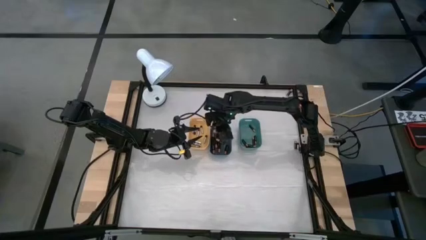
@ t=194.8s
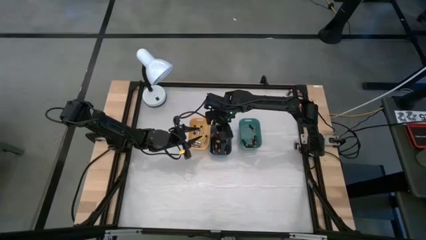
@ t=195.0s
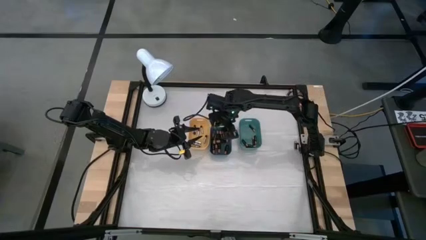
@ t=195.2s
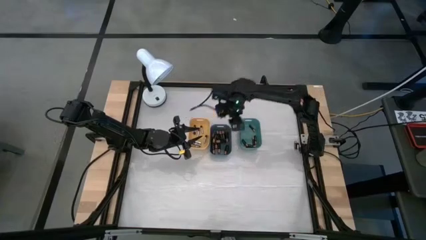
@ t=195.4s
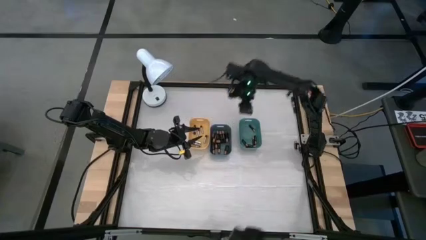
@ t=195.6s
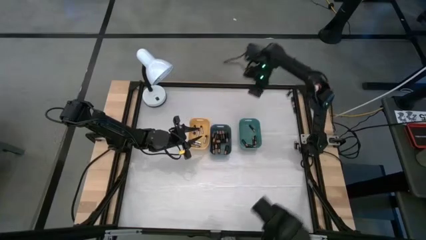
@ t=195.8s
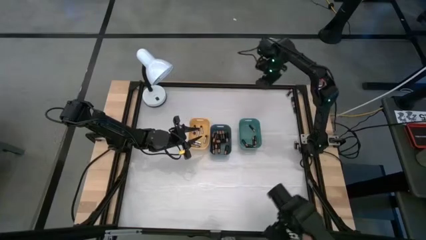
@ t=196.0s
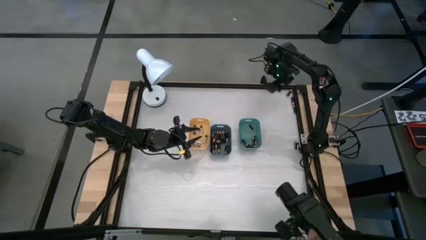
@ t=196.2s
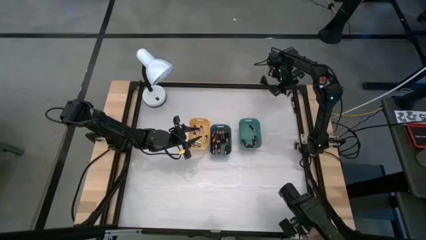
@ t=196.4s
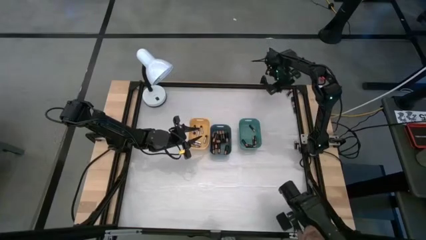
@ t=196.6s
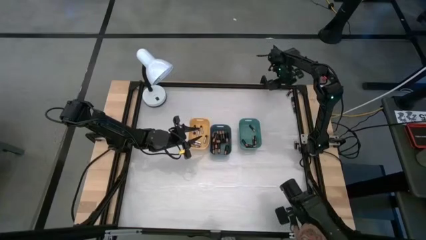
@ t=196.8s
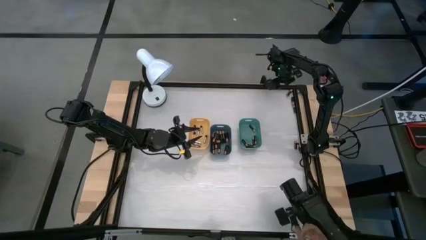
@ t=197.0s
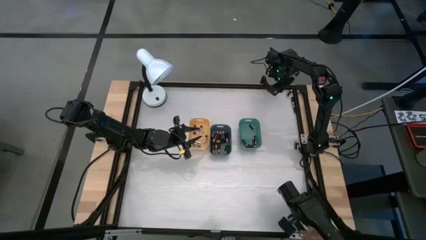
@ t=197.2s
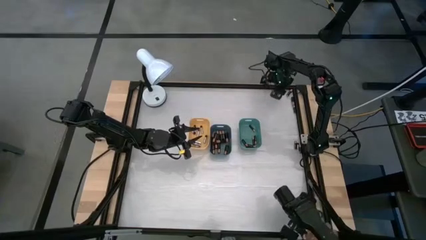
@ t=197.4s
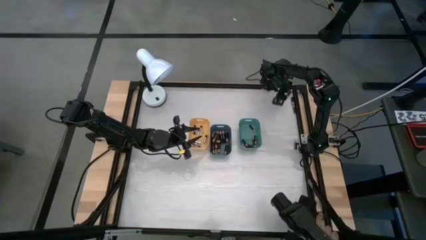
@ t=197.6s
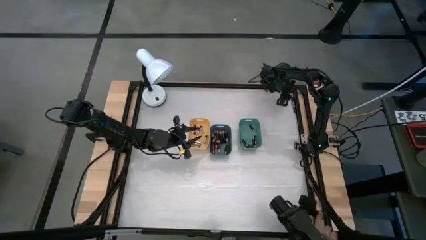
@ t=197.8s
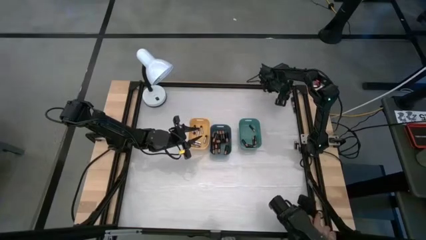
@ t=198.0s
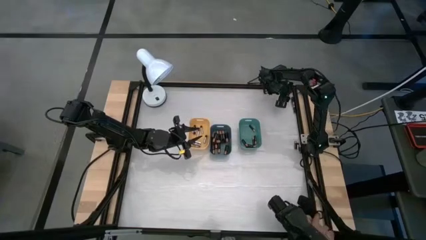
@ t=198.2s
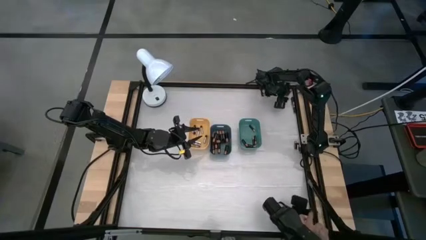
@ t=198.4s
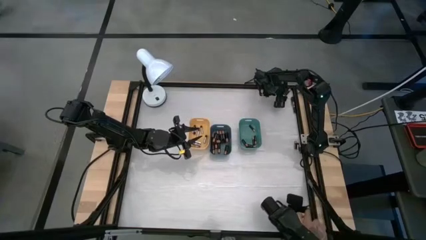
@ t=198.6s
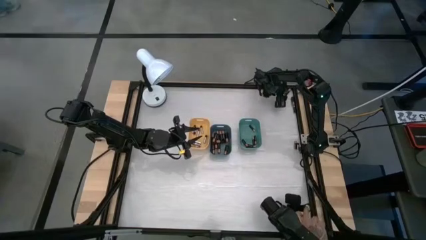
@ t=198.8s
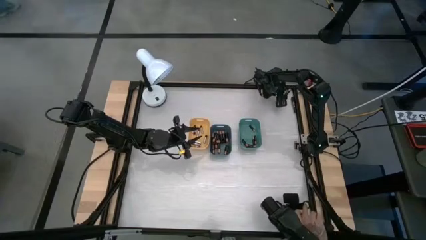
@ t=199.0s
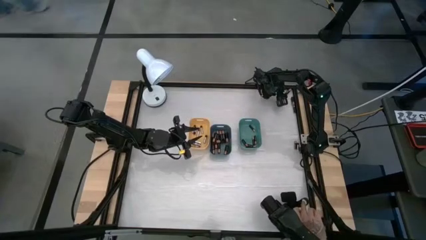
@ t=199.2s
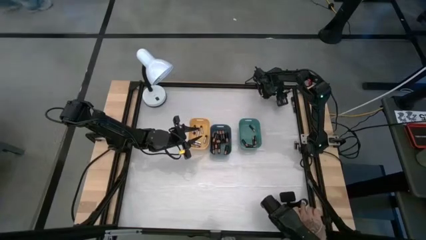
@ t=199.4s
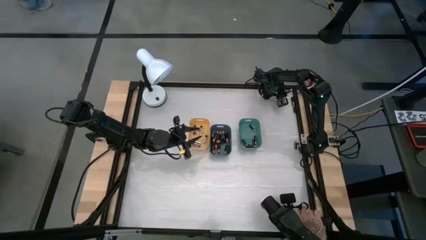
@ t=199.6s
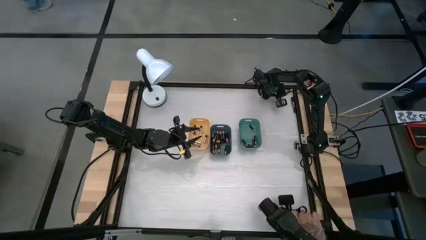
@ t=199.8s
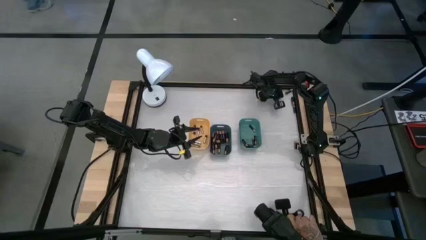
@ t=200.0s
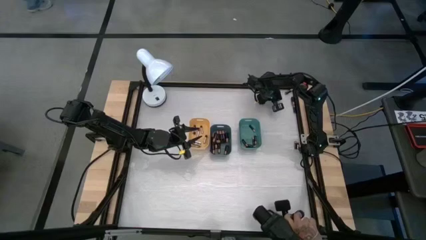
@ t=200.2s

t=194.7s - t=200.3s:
Task: Sort batteries
Put the black battery into the blue bin

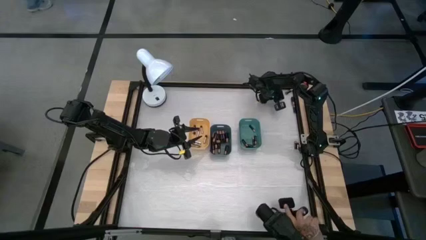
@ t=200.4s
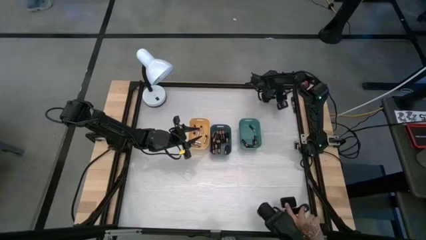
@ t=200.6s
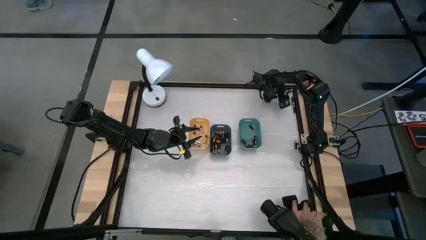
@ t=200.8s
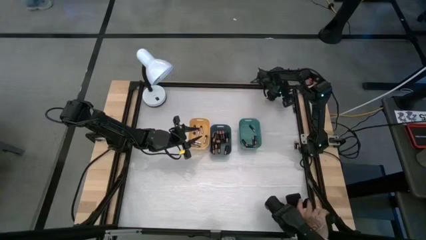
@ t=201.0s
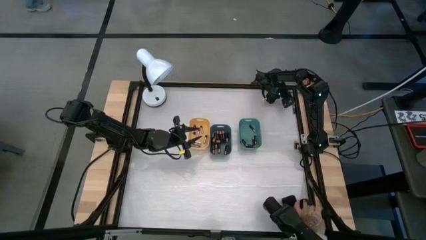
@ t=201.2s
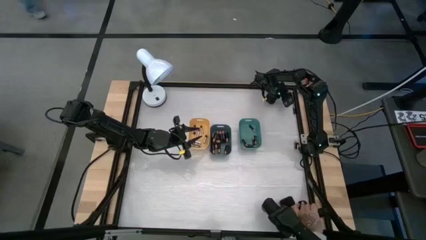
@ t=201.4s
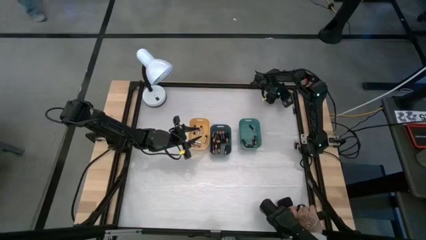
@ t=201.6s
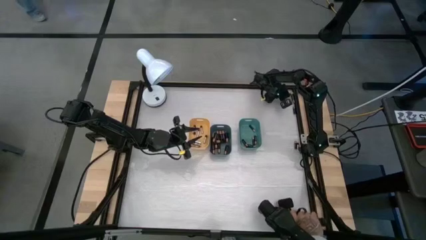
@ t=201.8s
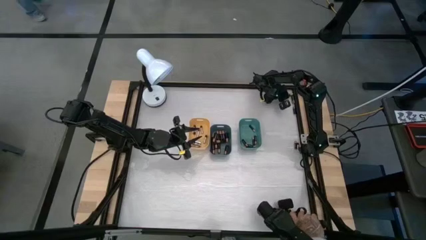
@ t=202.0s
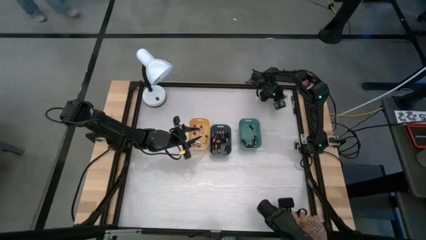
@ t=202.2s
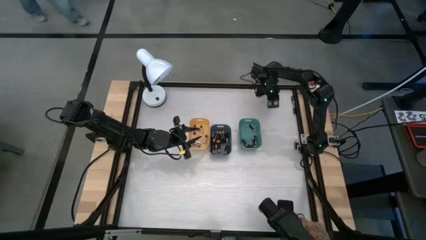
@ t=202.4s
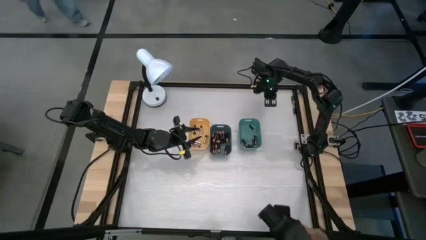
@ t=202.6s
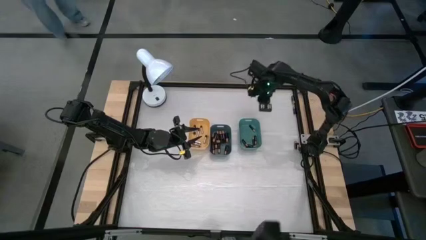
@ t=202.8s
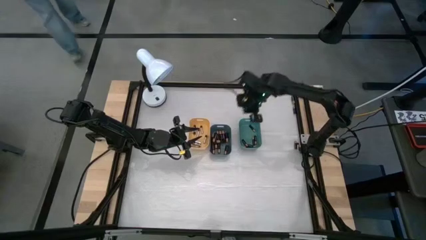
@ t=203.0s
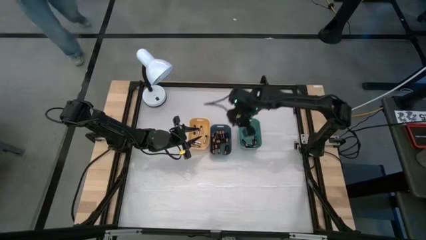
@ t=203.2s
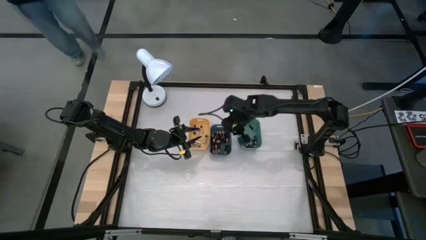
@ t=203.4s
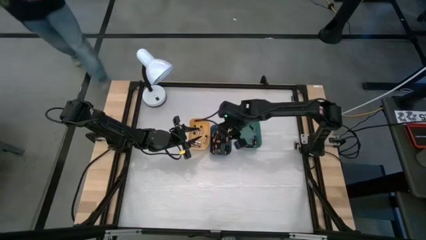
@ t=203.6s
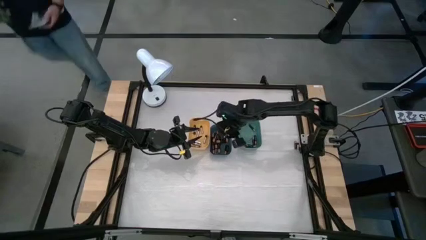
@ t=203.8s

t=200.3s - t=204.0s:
Put the black battery into the blue bin

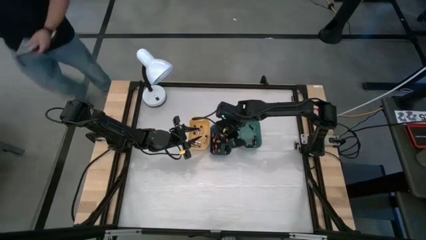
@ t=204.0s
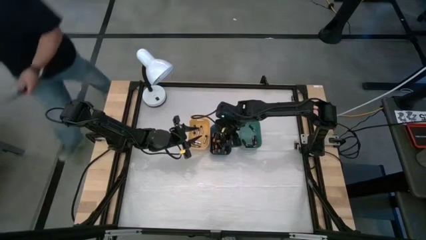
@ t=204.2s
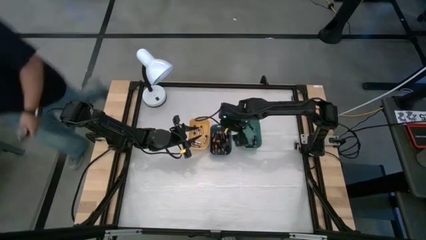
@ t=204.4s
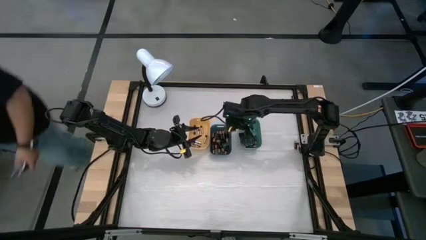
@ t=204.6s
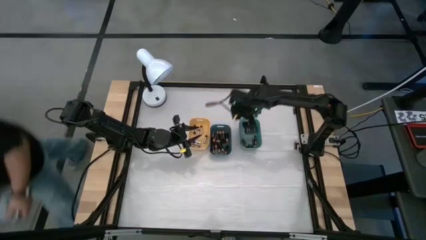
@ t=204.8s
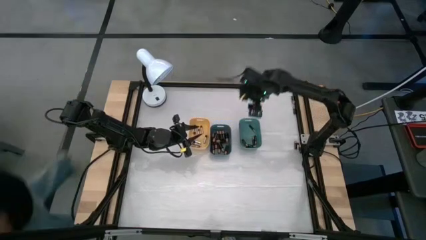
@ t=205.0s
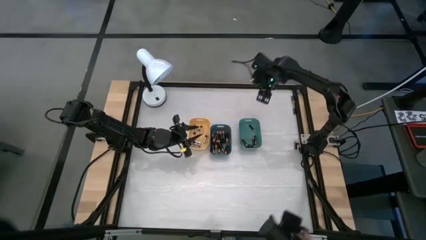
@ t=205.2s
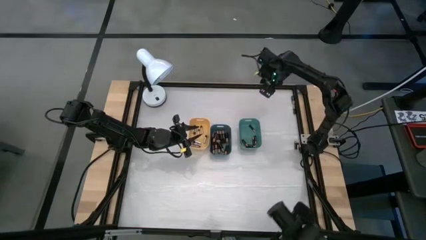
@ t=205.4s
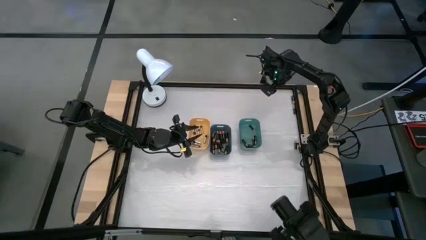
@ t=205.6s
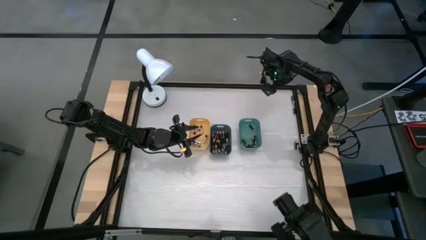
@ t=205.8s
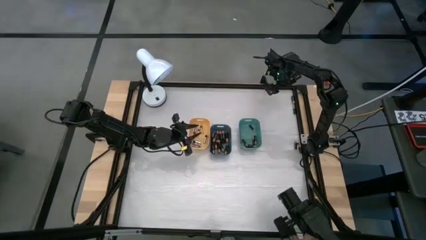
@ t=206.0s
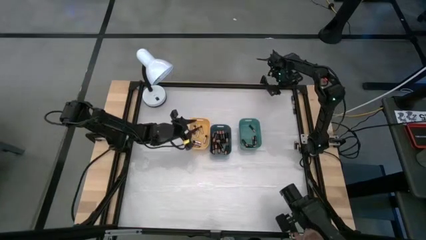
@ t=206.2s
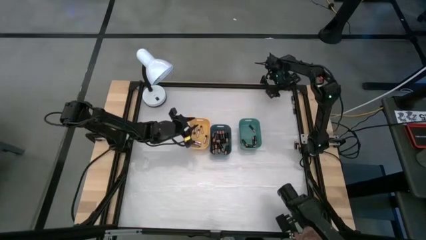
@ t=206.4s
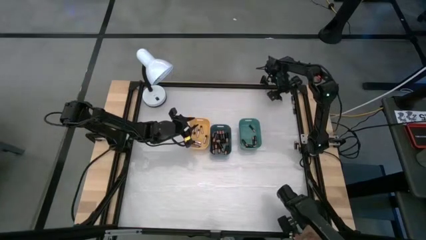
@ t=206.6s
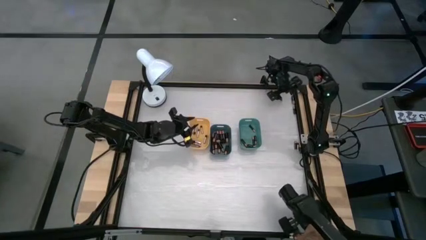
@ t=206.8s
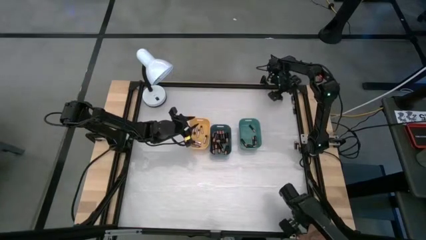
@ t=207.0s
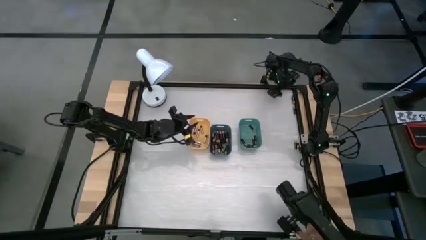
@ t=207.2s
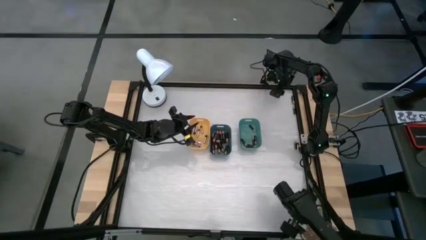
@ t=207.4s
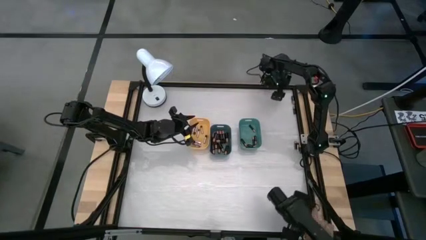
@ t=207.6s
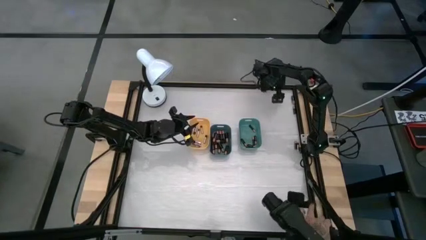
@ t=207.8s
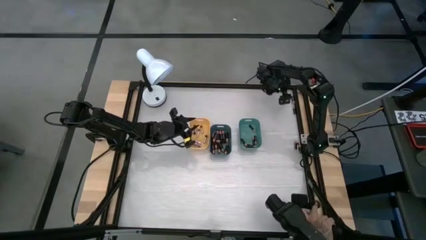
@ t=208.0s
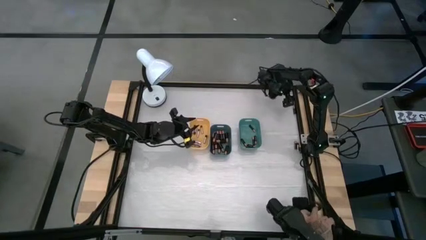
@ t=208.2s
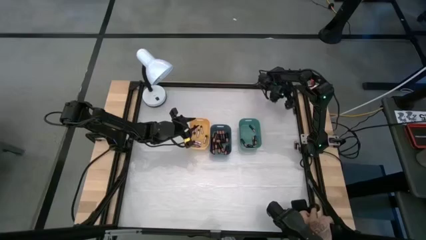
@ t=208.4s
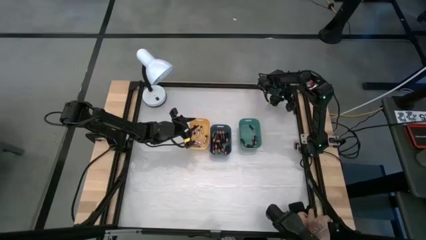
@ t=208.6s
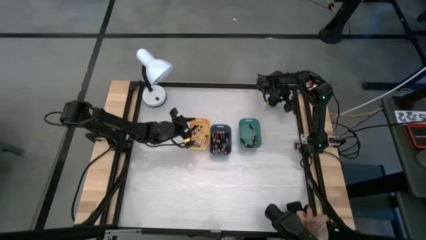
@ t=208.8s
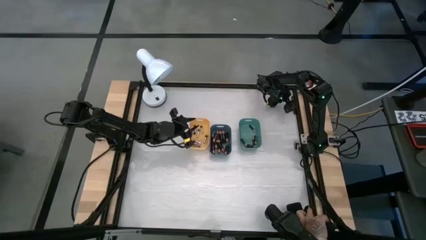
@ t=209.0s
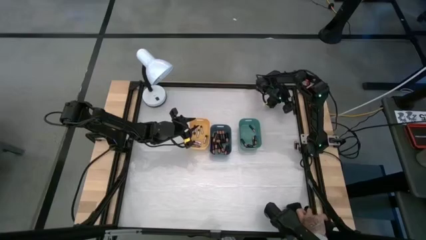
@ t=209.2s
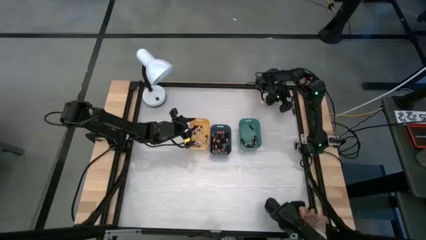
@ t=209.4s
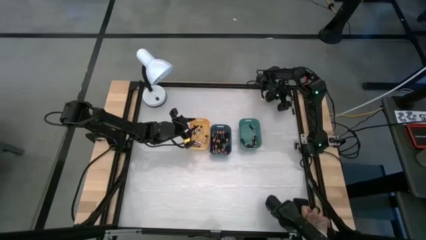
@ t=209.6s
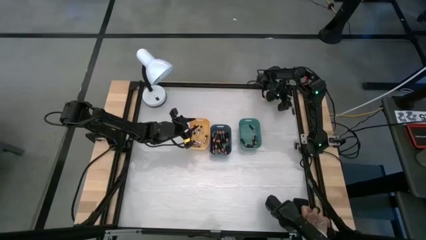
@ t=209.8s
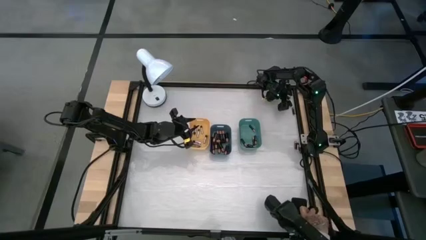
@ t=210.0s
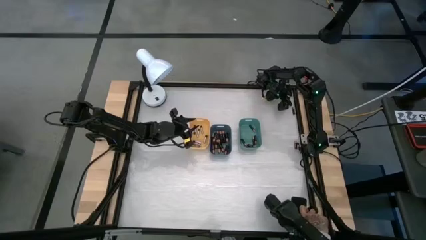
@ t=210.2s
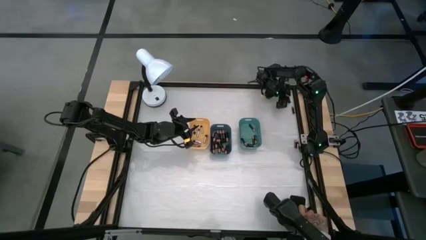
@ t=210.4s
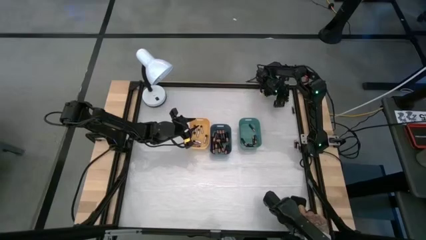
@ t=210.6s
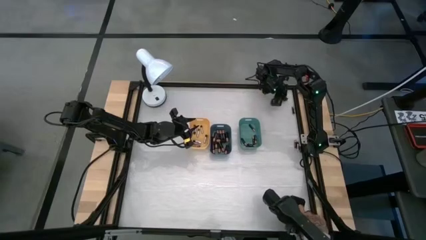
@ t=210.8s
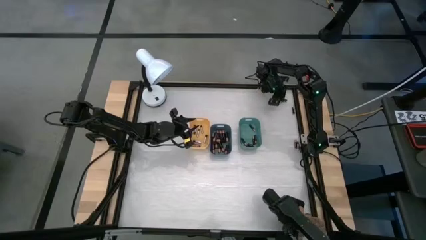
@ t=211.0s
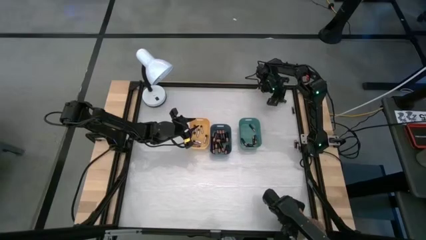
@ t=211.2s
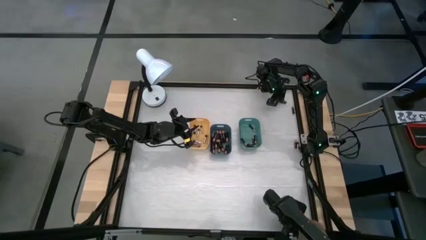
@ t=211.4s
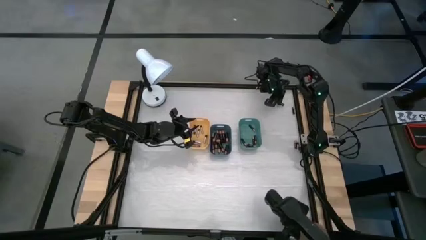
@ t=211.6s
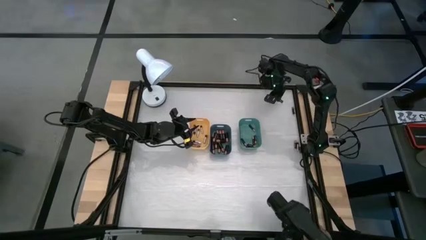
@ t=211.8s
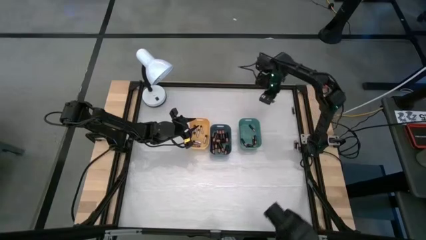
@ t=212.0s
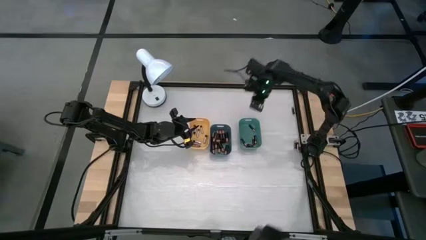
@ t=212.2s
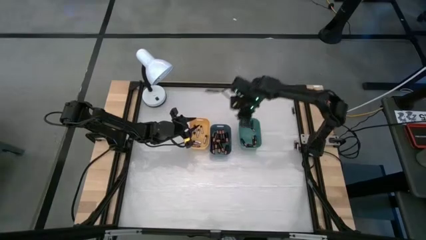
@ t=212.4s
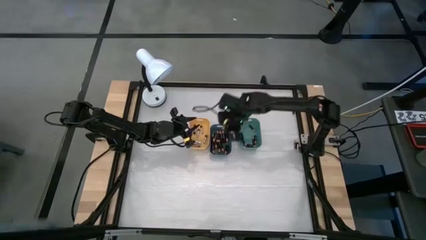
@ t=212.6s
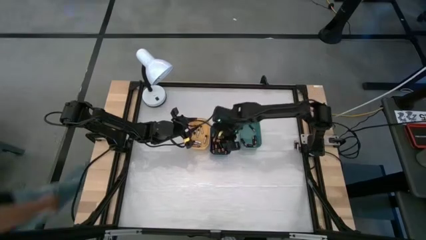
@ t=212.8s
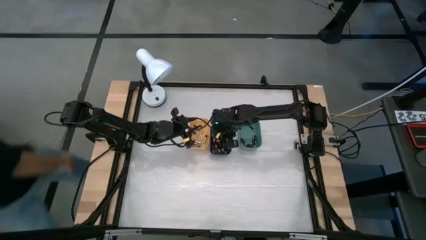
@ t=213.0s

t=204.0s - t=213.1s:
Put the black battery into the blue bin
